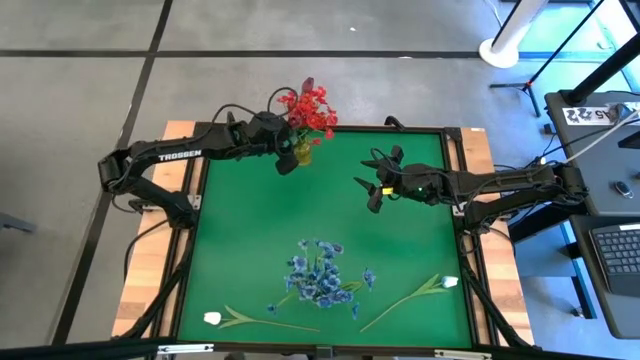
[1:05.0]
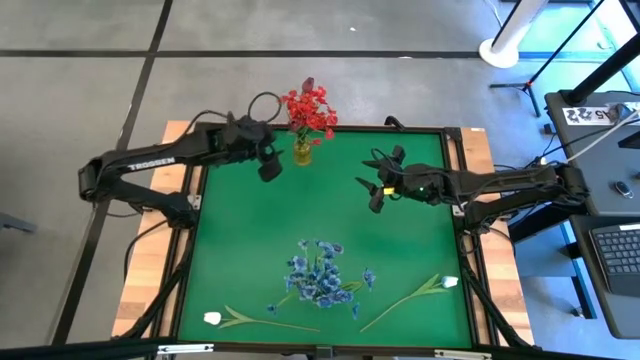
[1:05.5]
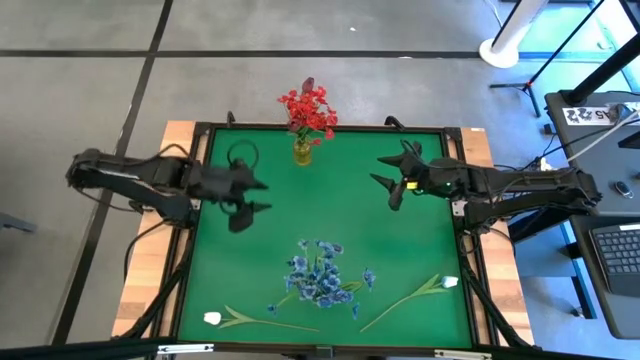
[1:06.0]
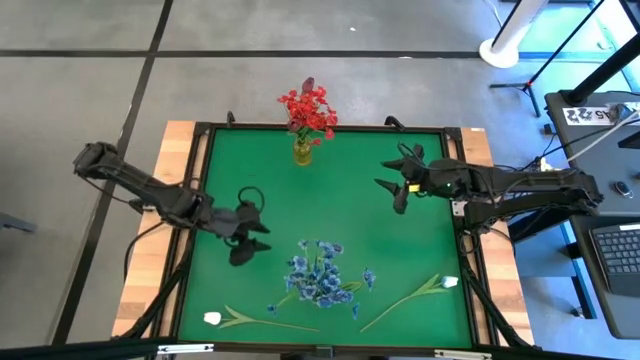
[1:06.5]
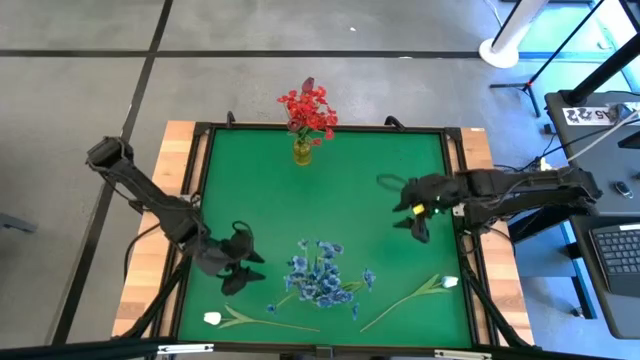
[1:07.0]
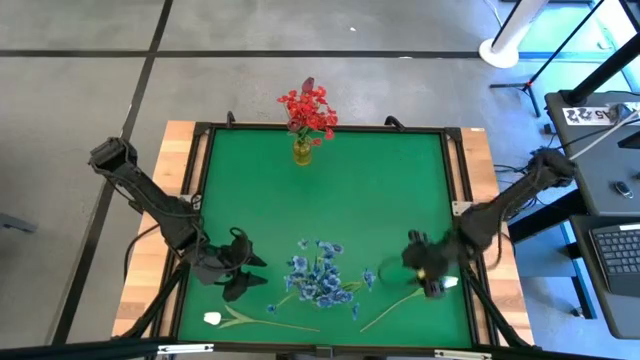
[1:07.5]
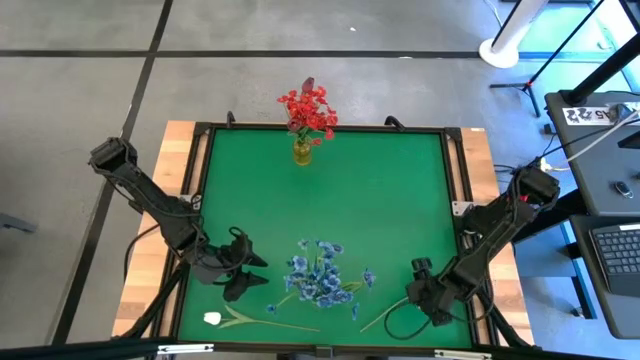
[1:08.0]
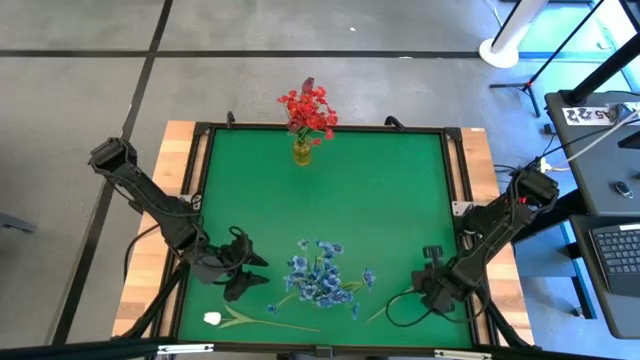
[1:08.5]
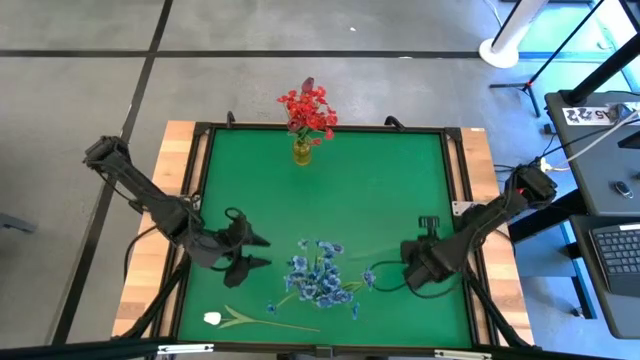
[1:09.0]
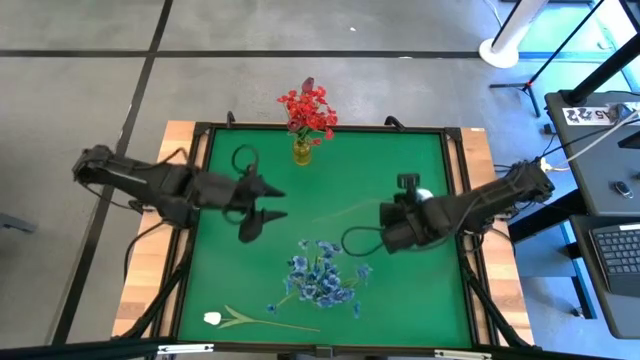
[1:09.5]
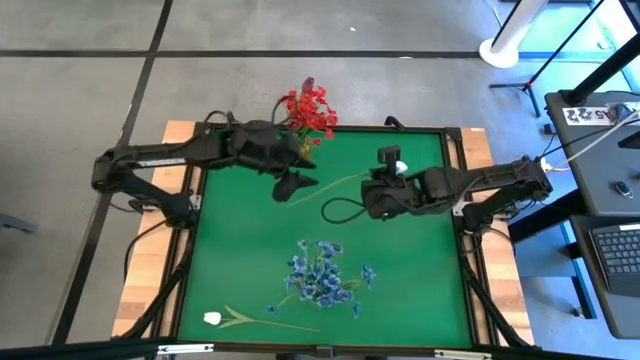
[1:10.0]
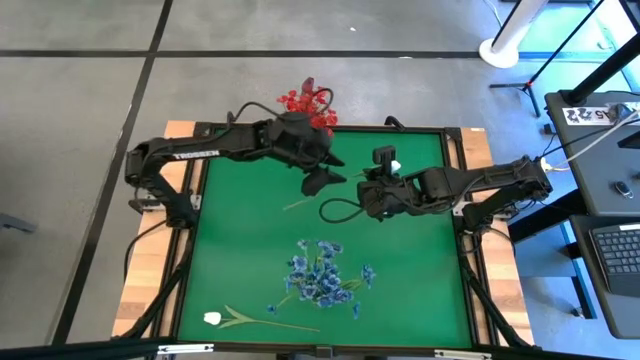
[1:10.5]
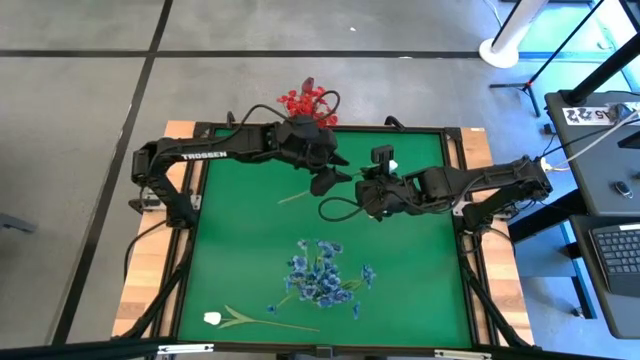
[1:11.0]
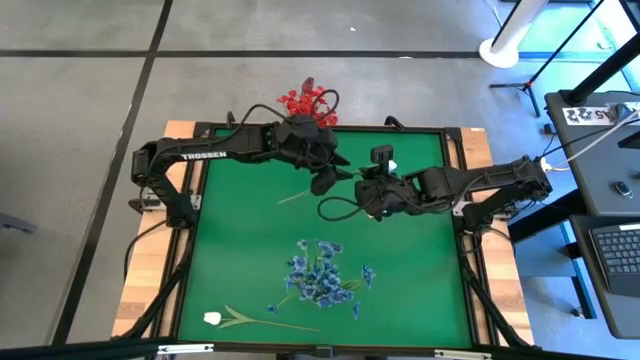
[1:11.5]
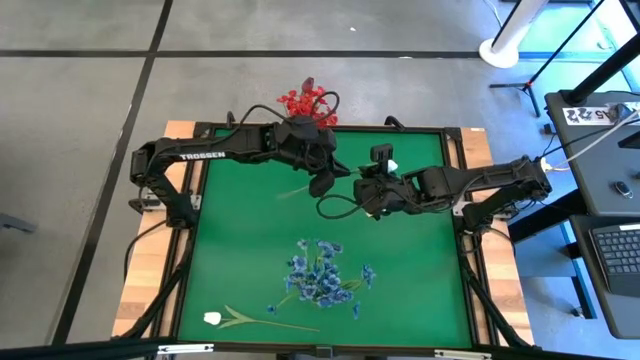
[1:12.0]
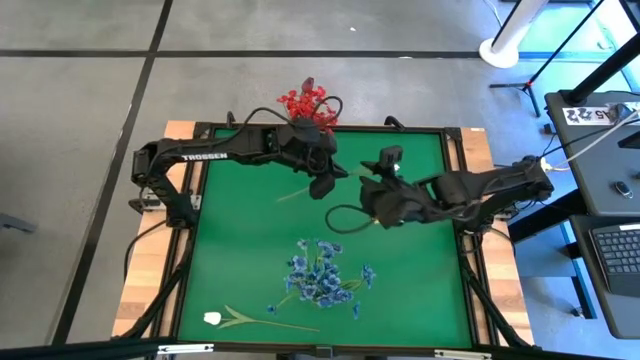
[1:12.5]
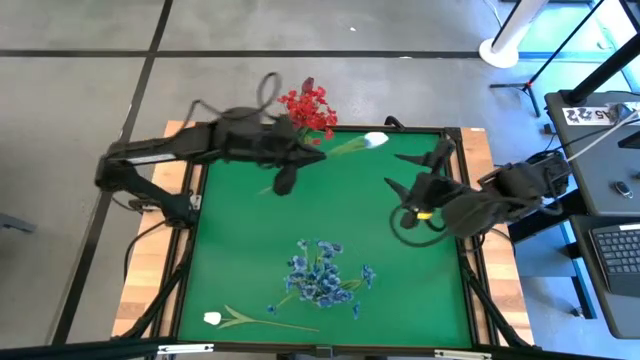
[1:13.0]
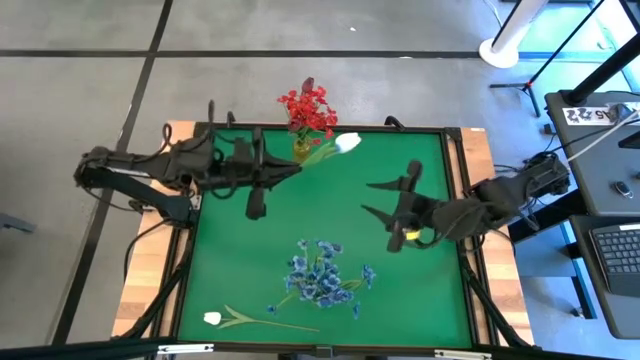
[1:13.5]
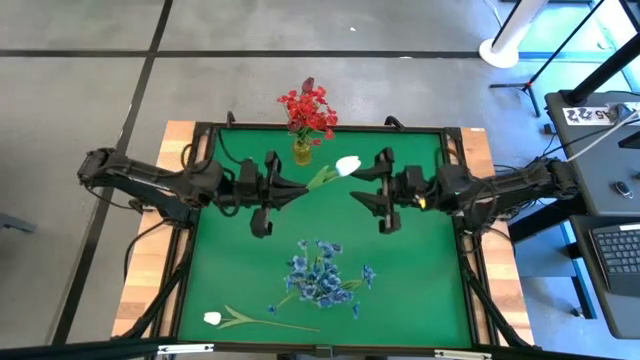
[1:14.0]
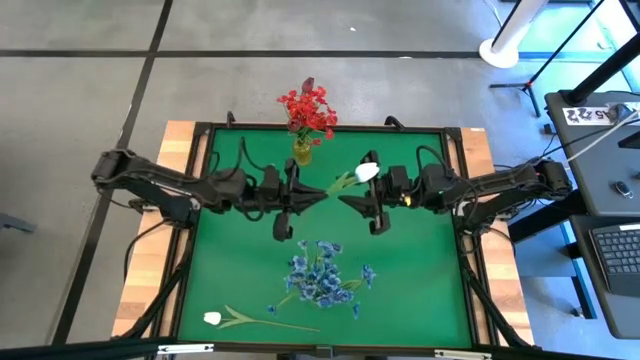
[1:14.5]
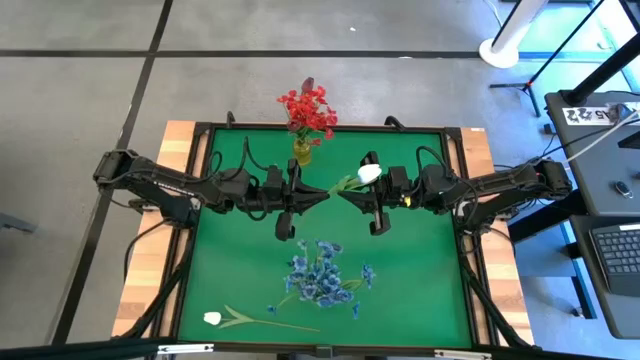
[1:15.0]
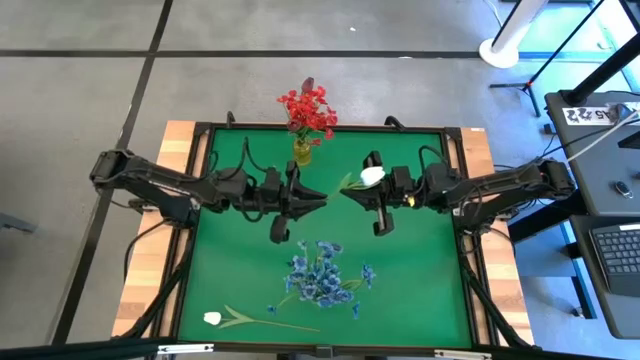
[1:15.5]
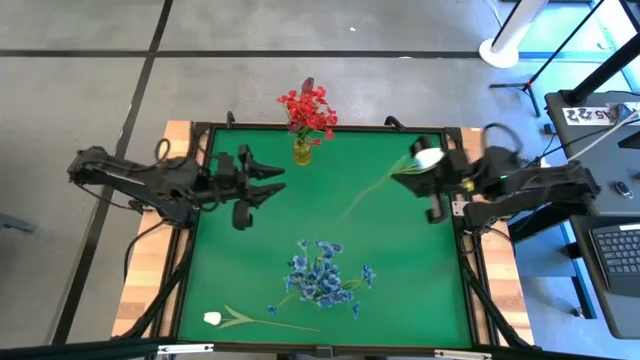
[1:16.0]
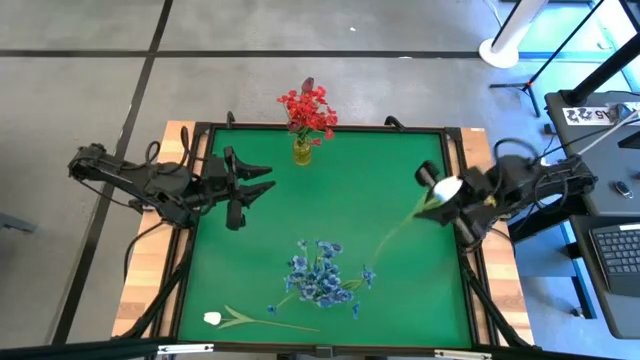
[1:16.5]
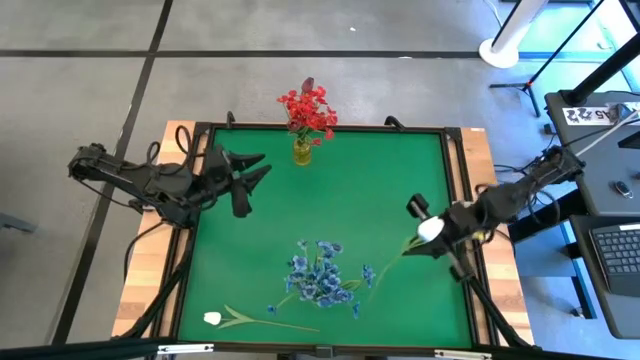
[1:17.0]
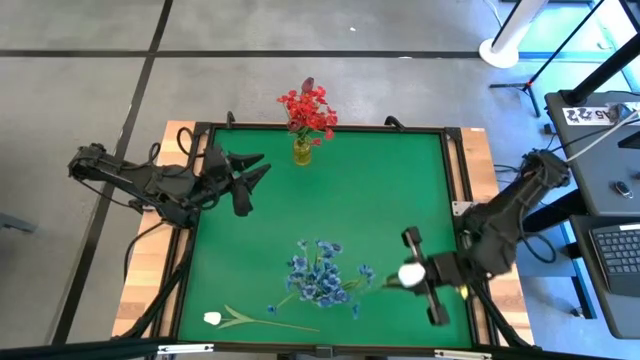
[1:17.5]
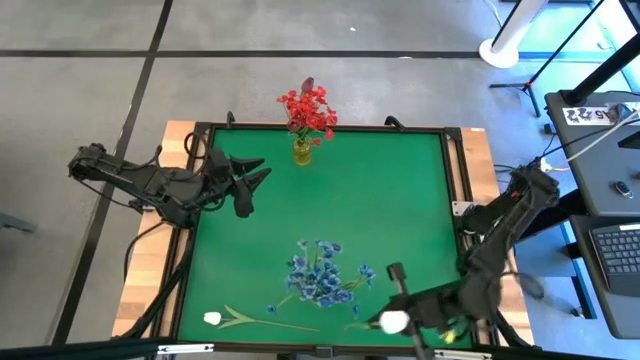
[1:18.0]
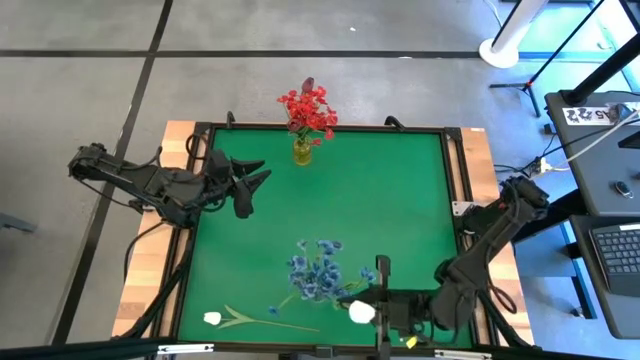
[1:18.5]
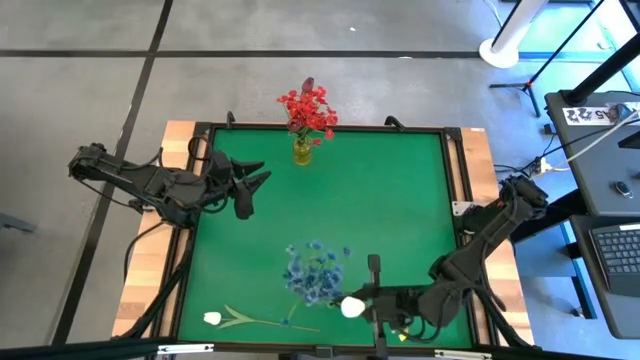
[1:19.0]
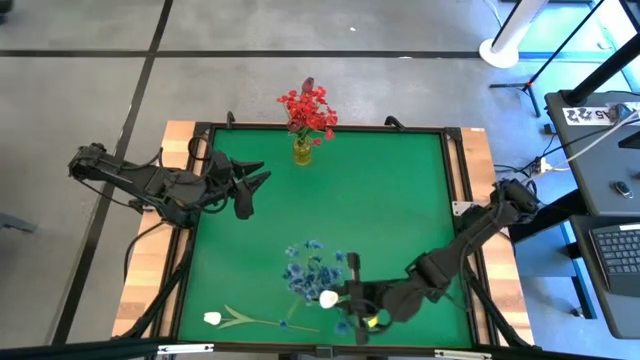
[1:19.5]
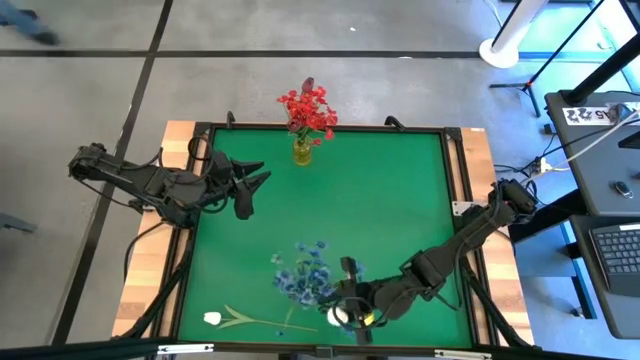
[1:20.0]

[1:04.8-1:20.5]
Task: Sort flowers into vase by color
Put the right white tulip into the transparent vase

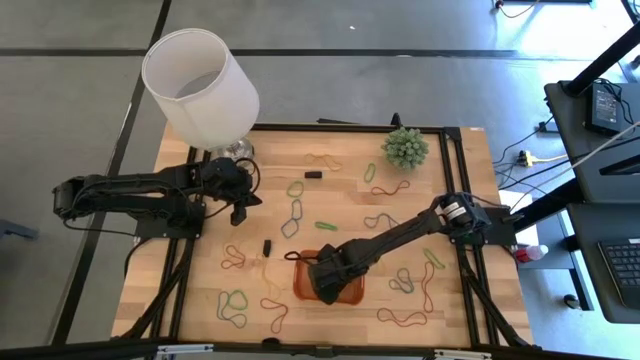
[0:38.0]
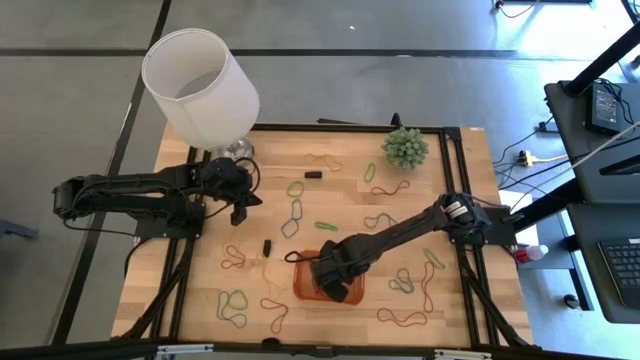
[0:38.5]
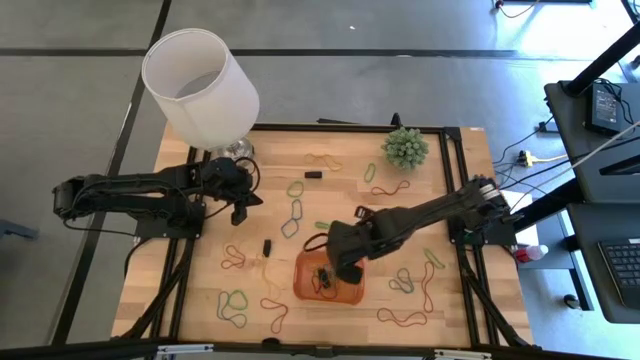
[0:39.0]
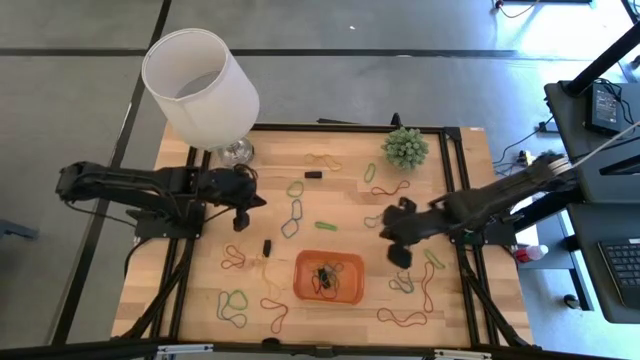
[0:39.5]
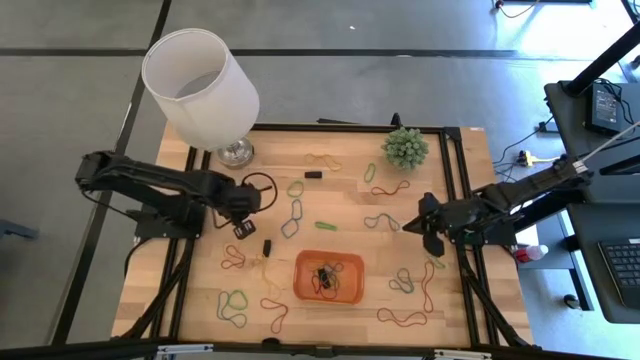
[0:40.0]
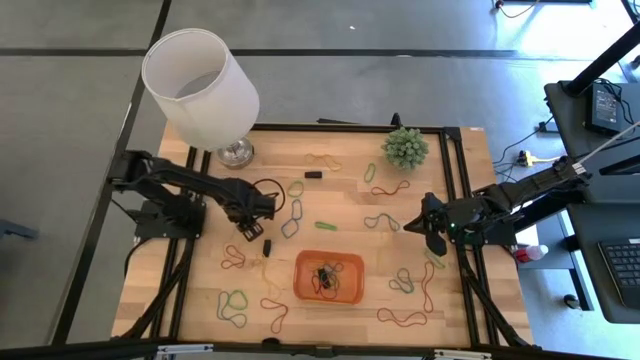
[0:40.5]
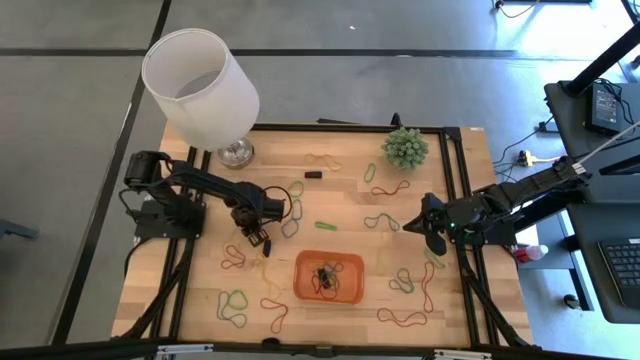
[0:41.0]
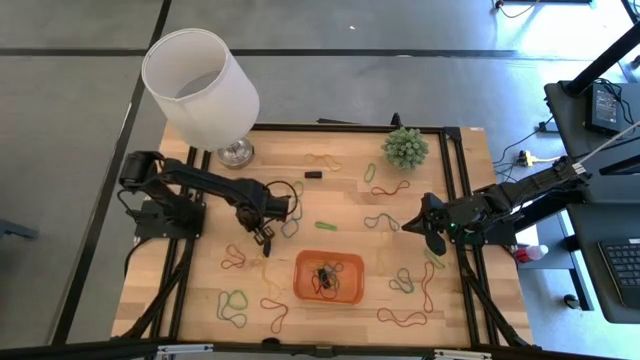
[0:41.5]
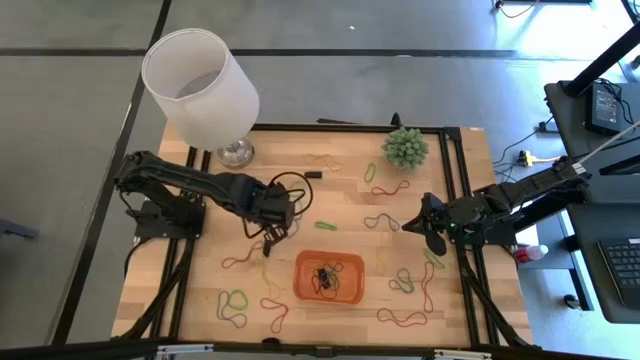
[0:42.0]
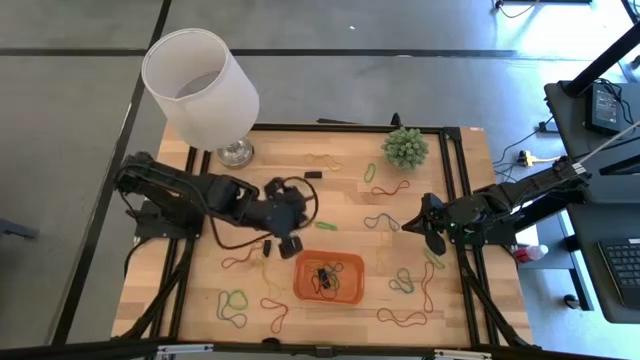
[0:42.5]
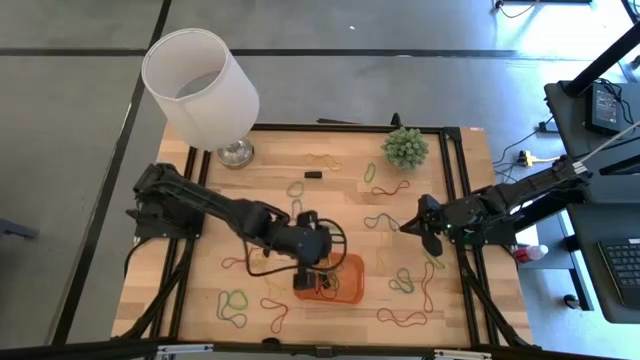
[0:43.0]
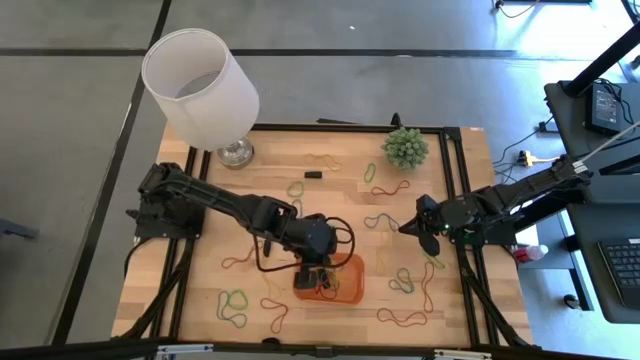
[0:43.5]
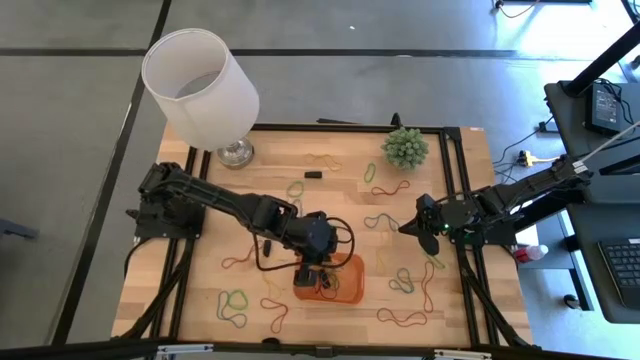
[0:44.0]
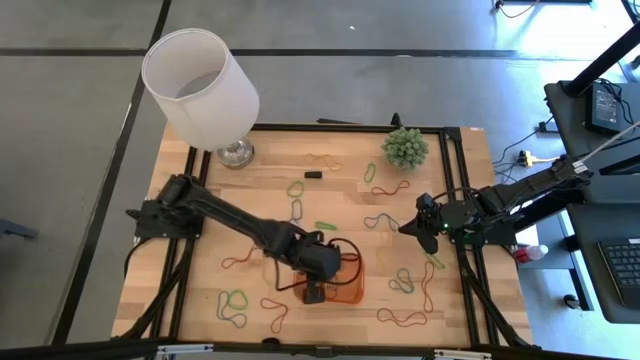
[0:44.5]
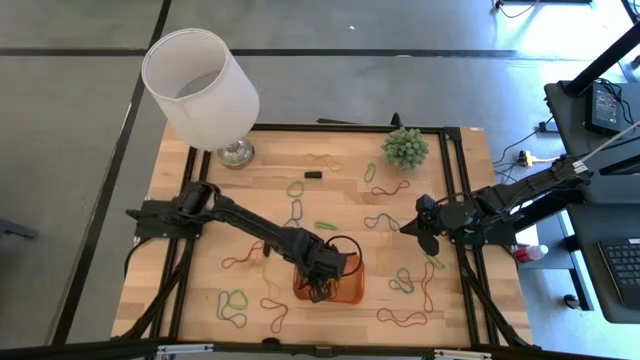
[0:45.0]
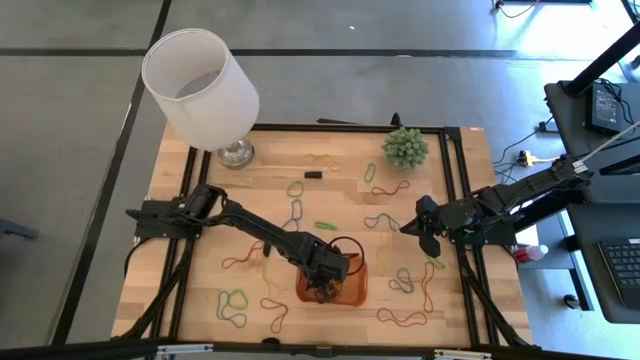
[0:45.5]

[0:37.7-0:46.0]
Task: Pick and place rubber bands into bin
Put the yellow rubber band into the orange bin
